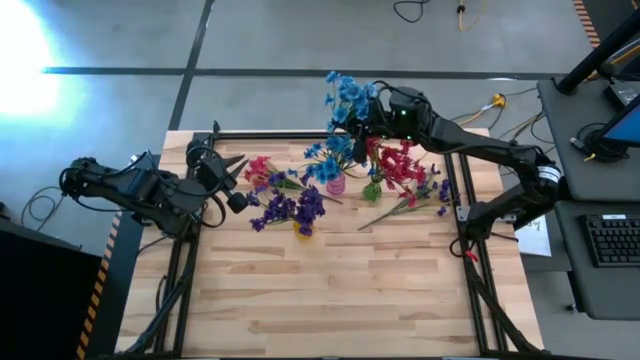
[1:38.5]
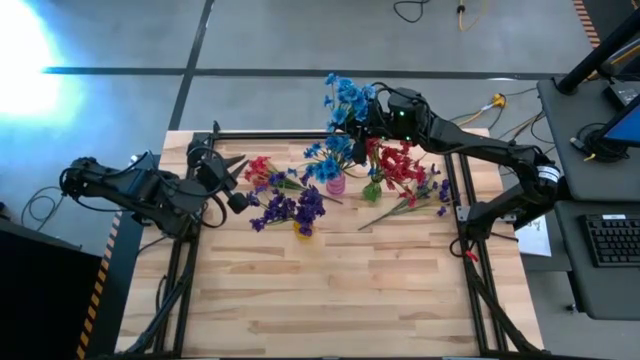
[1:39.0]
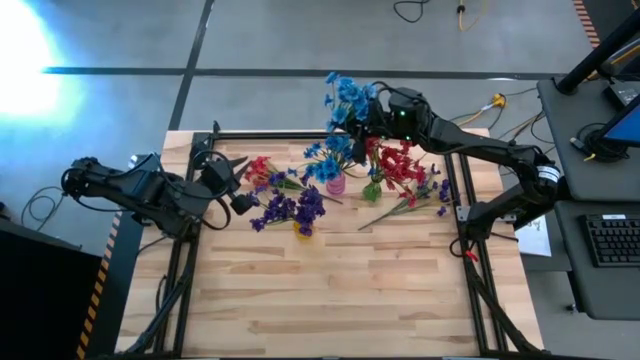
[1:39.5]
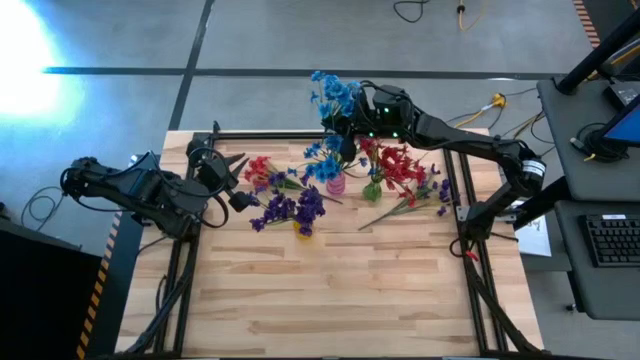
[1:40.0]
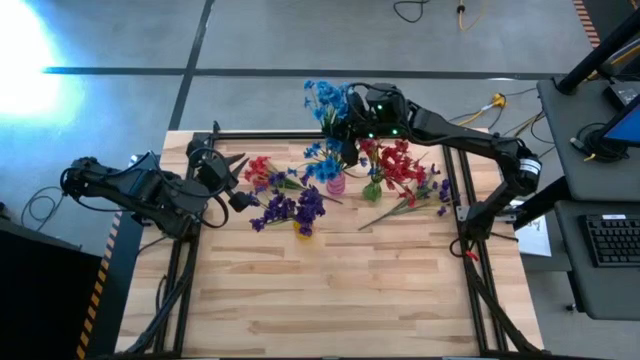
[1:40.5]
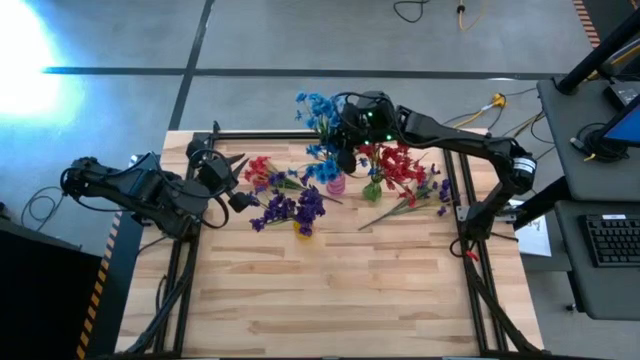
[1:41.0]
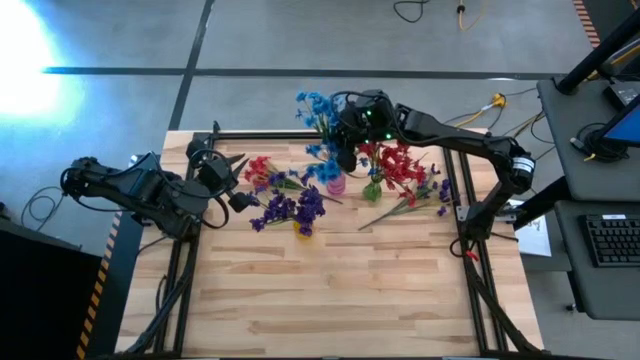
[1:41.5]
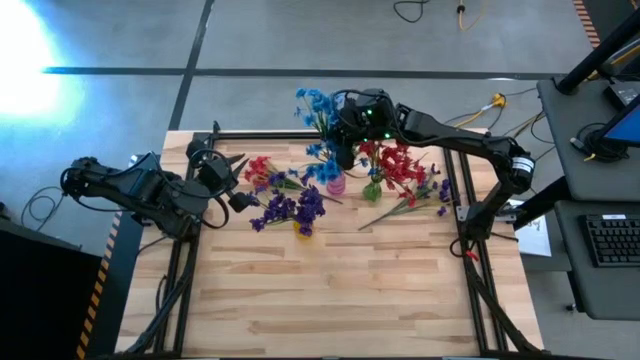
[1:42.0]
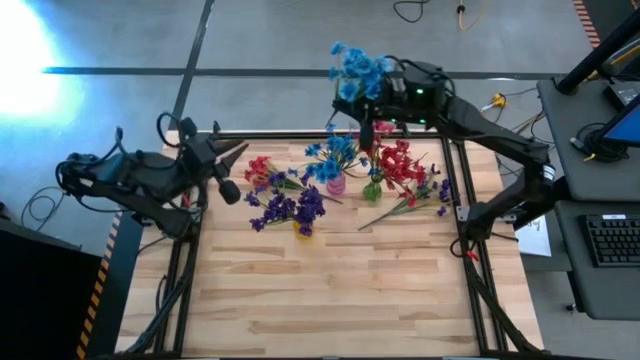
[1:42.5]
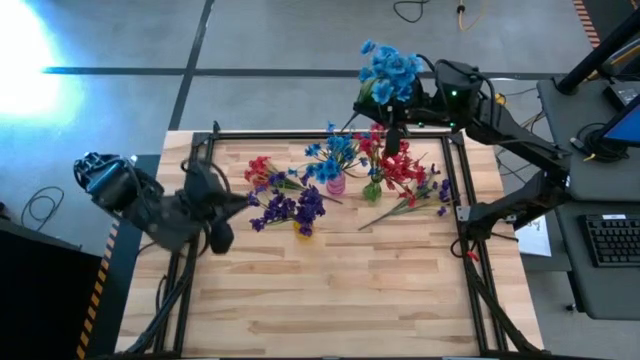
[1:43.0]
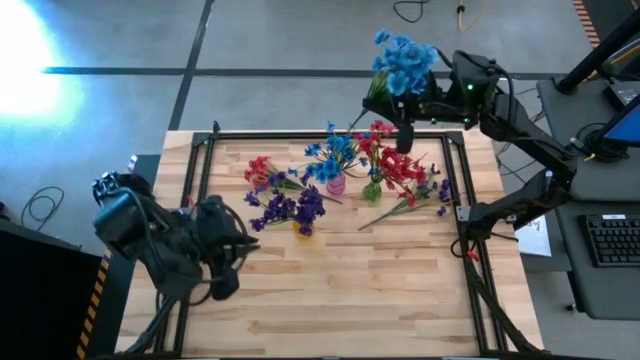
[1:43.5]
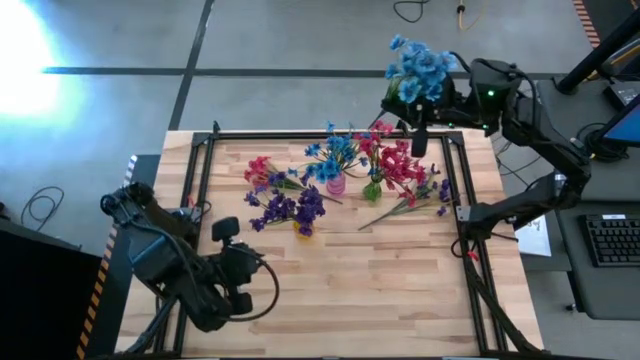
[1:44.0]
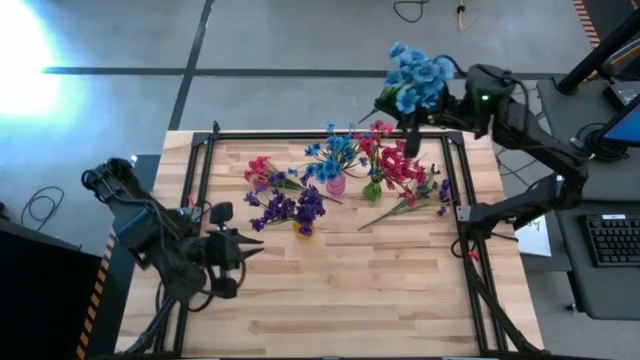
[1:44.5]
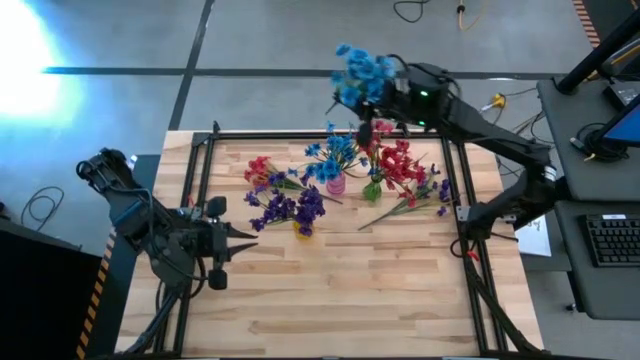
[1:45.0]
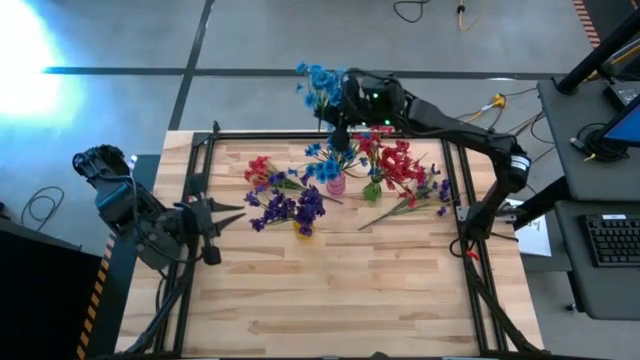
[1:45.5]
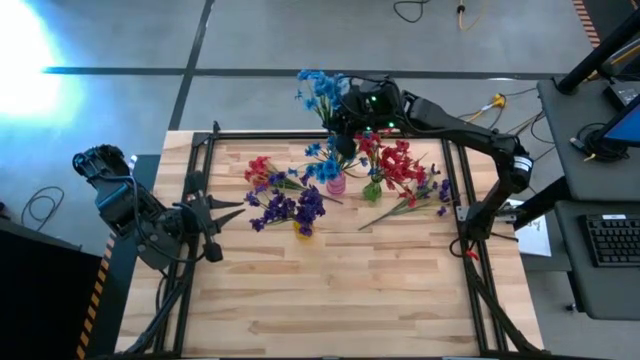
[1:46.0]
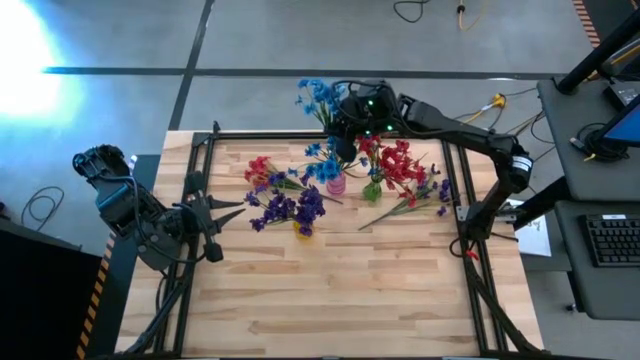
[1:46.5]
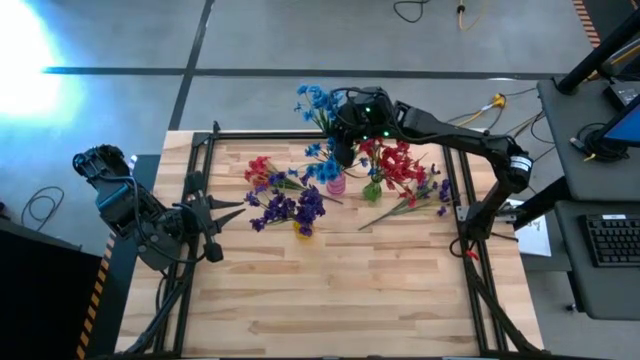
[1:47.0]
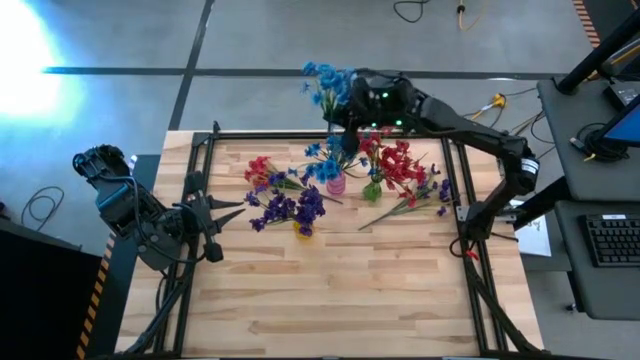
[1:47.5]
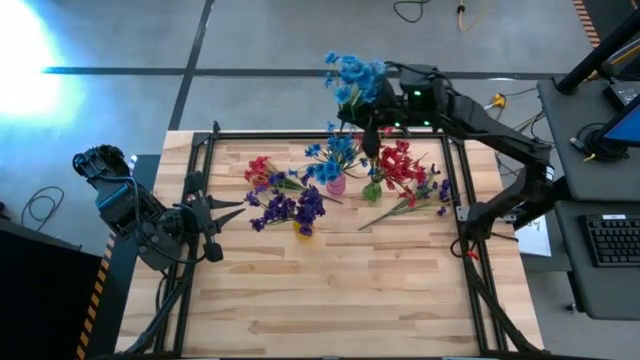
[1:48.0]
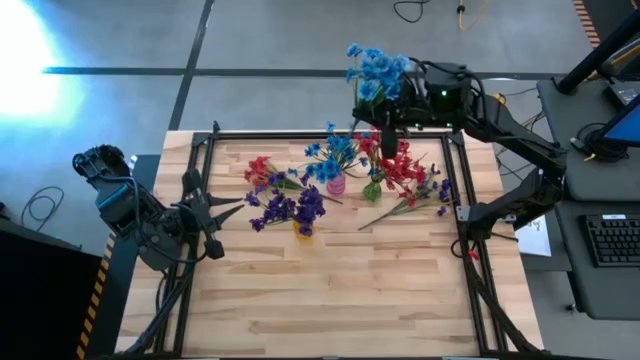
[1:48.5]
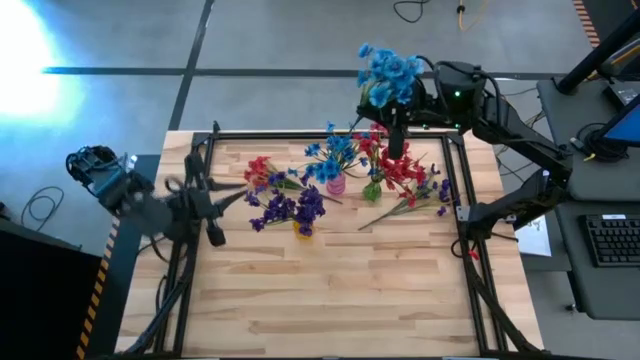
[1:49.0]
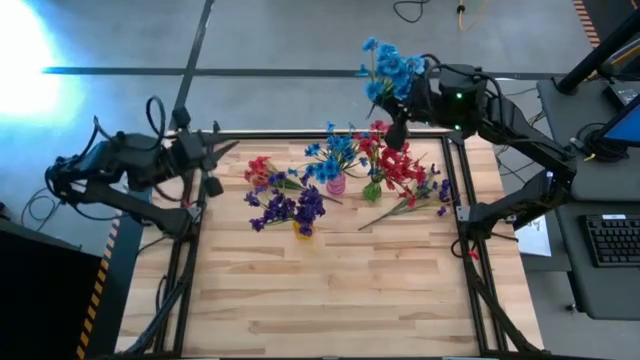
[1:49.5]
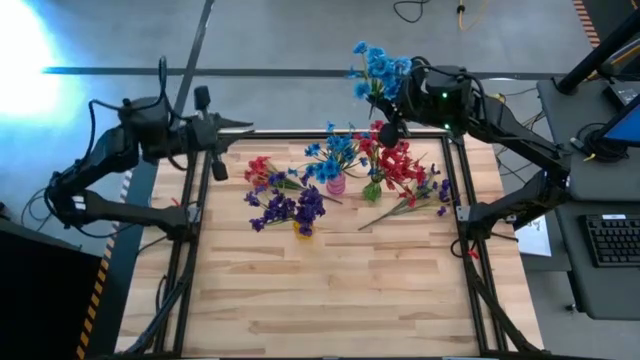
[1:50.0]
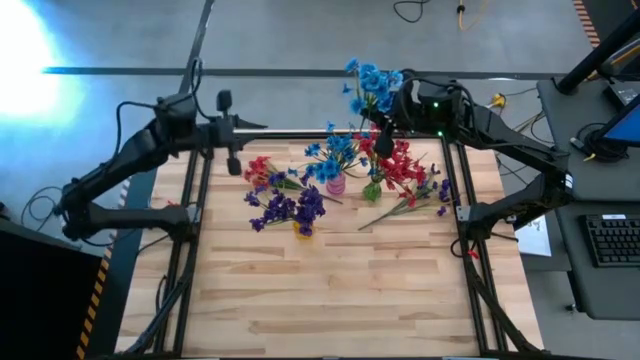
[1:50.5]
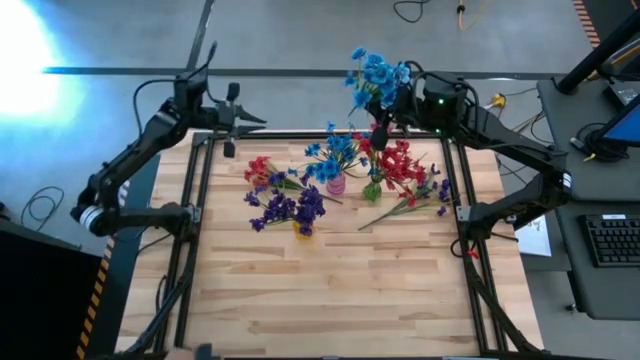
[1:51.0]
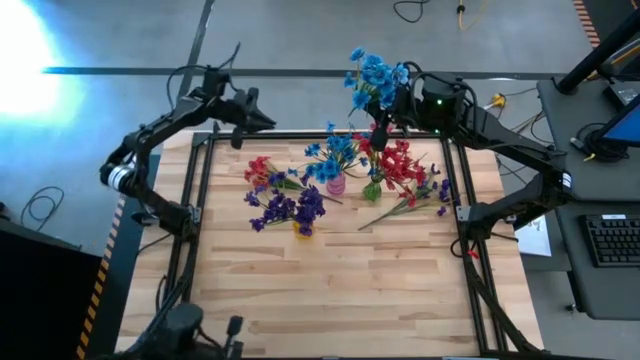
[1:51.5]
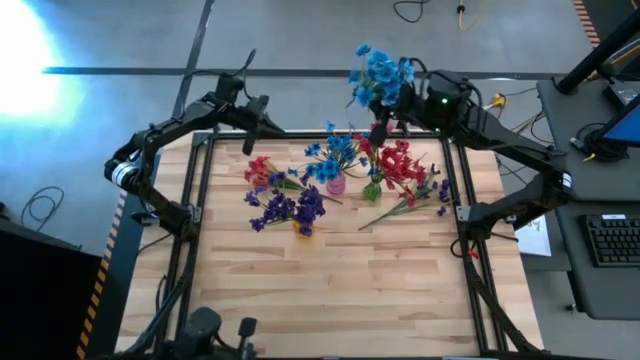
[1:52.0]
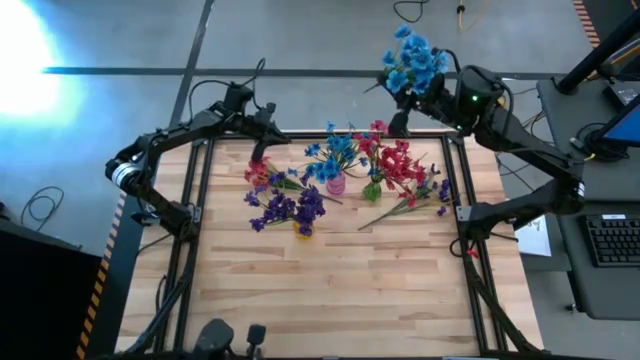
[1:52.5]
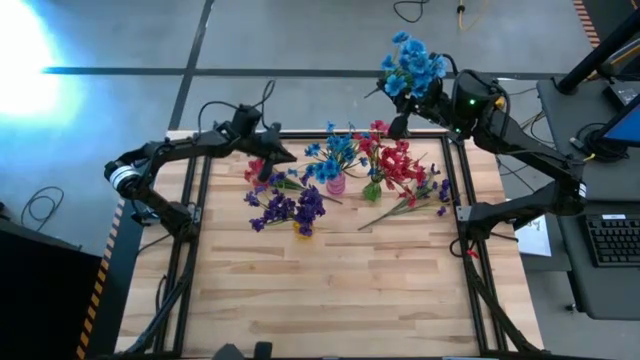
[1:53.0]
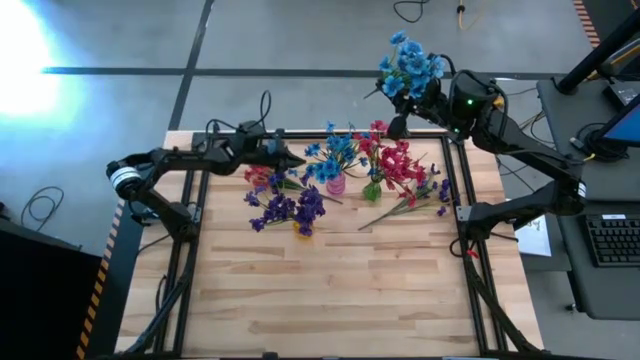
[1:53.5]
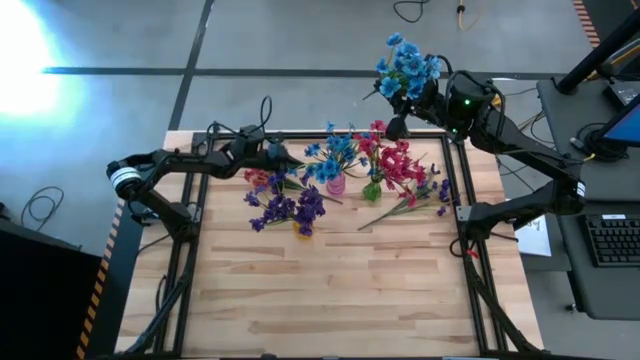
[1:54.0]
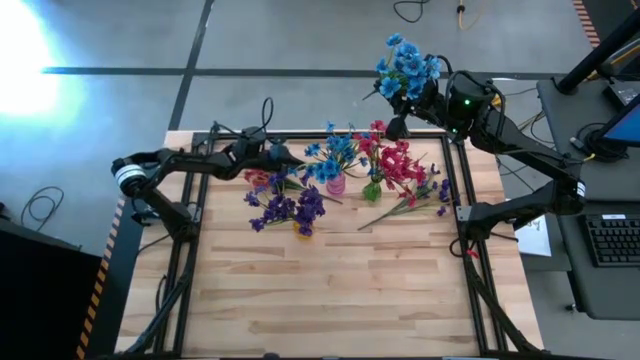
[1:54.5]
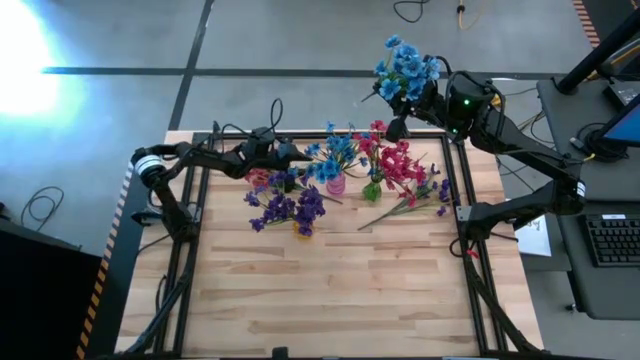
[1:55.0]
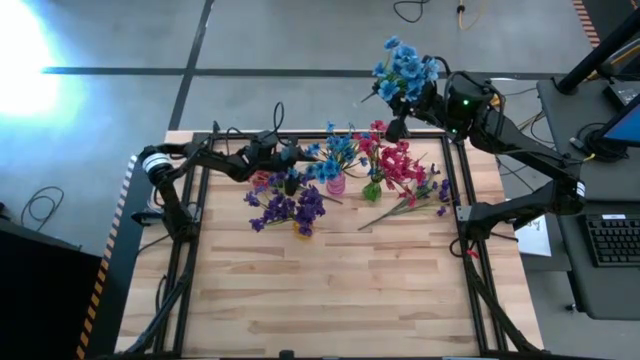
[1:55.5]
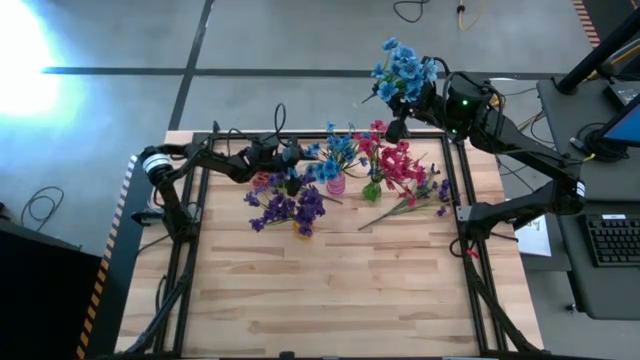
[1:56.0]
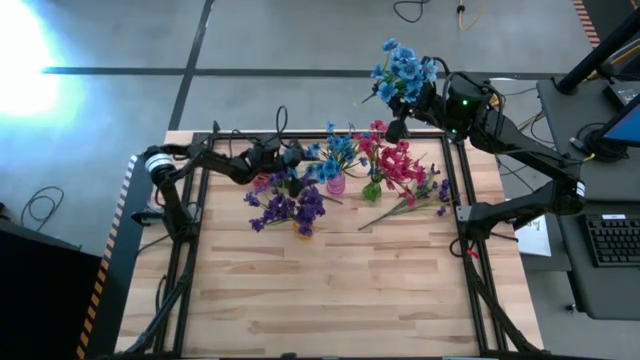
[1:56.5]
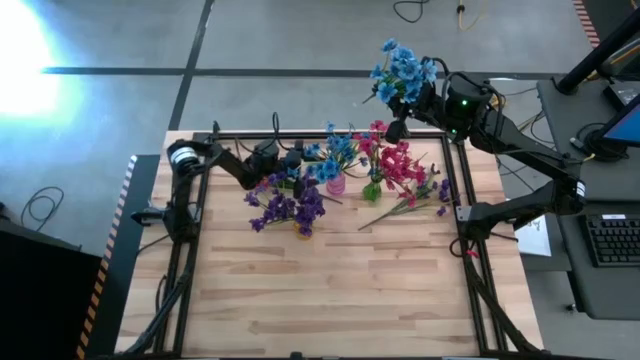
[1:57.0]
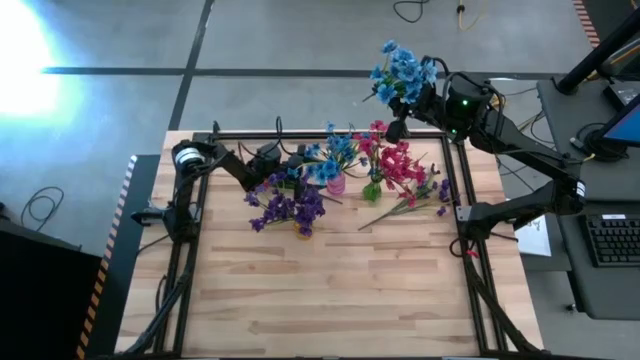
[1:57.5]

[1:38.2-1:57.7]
Task: Sort flowers into vase by color
Put the blue flowers into the pink vase
